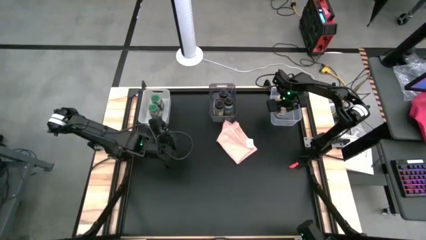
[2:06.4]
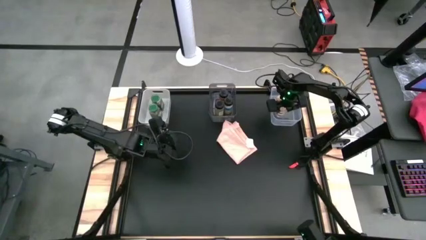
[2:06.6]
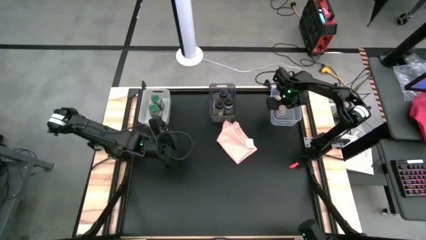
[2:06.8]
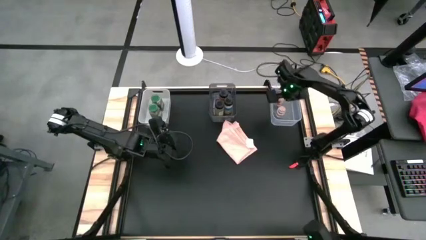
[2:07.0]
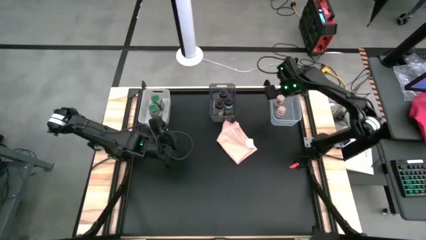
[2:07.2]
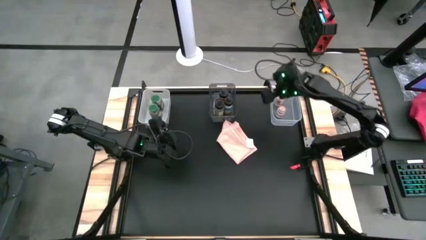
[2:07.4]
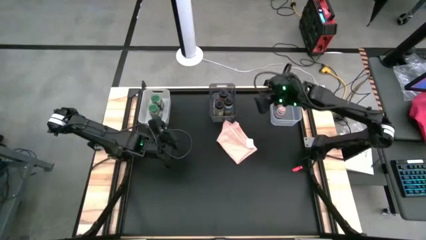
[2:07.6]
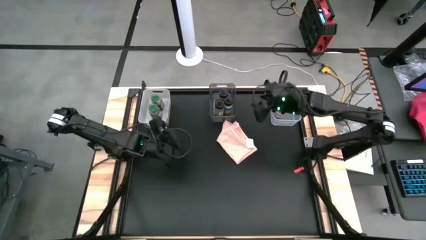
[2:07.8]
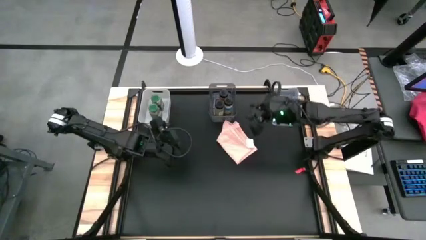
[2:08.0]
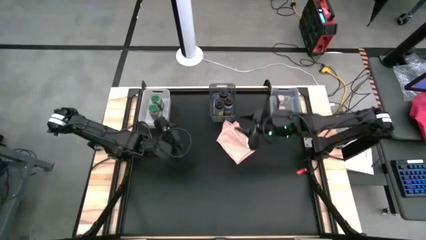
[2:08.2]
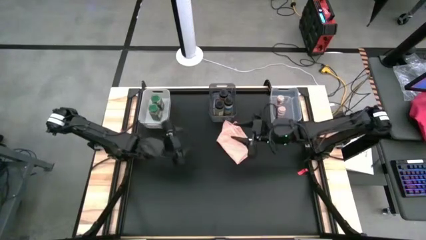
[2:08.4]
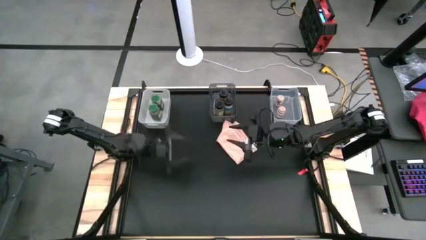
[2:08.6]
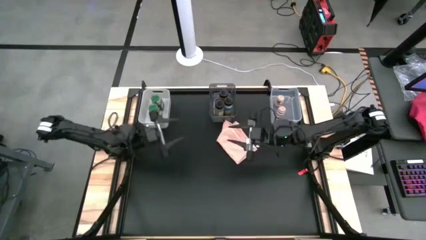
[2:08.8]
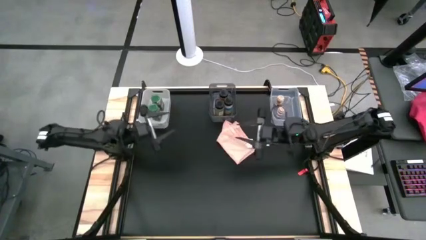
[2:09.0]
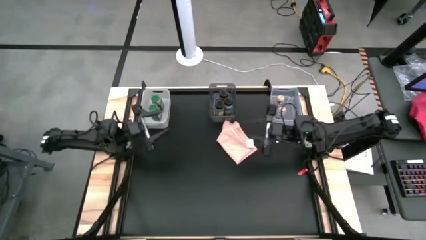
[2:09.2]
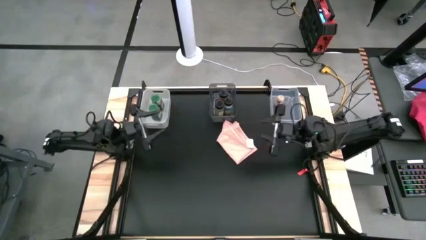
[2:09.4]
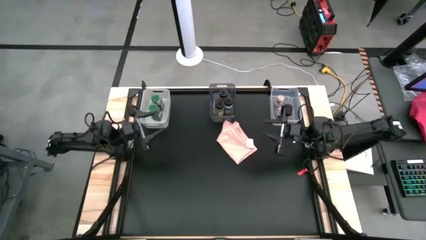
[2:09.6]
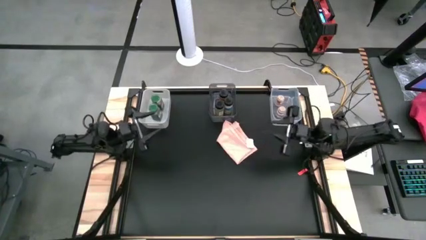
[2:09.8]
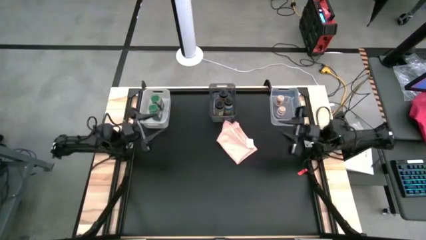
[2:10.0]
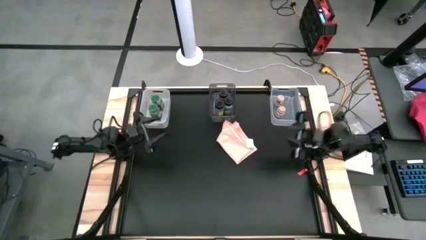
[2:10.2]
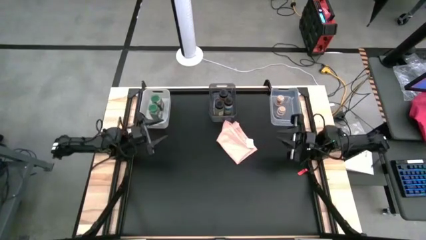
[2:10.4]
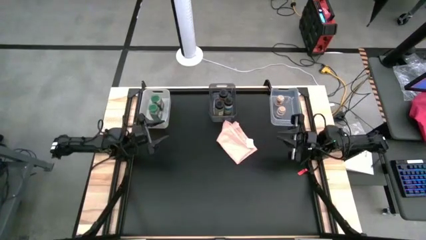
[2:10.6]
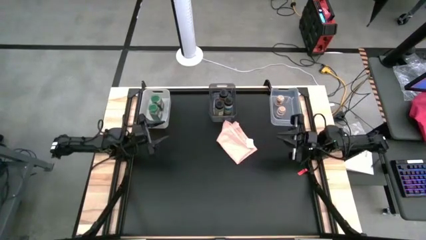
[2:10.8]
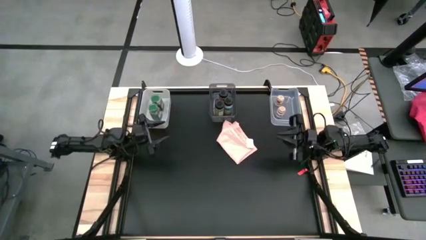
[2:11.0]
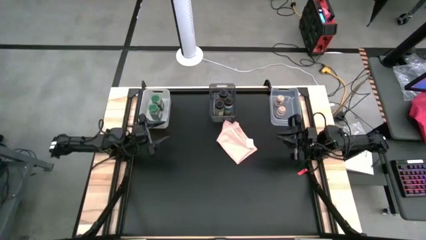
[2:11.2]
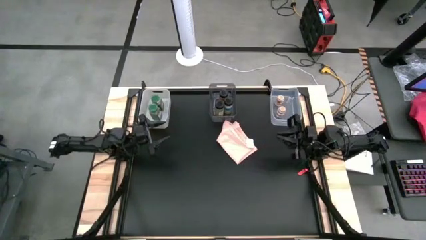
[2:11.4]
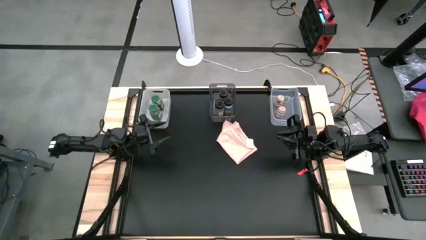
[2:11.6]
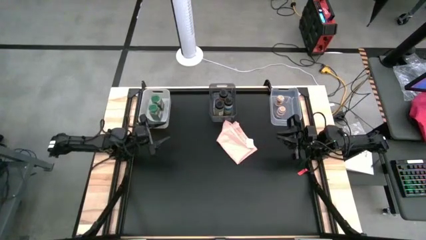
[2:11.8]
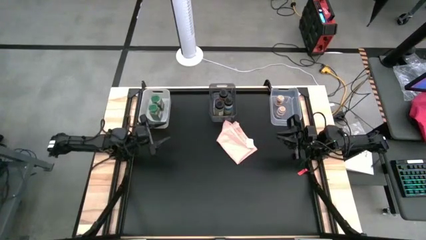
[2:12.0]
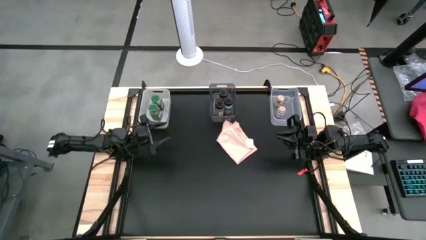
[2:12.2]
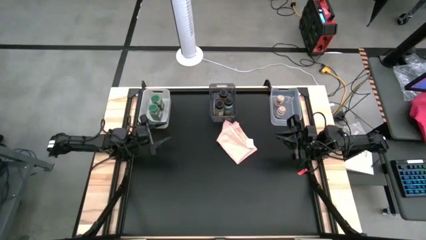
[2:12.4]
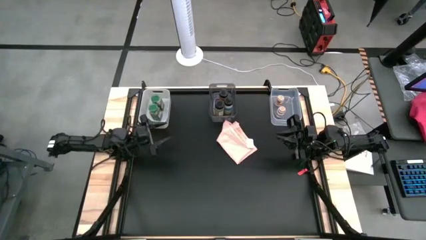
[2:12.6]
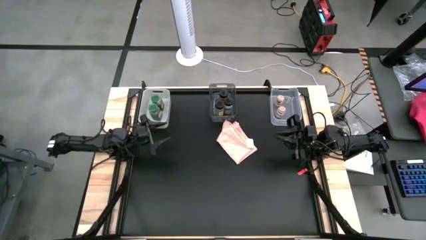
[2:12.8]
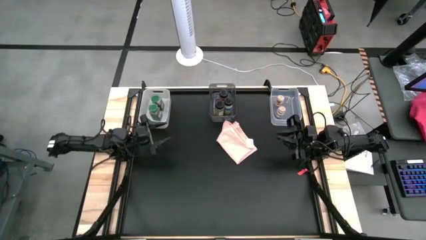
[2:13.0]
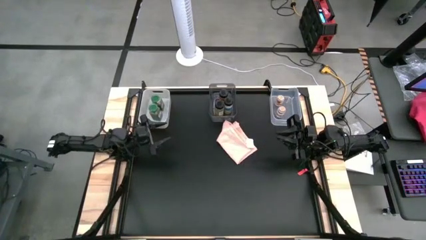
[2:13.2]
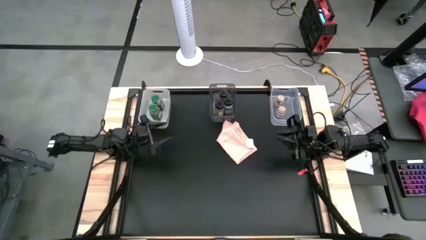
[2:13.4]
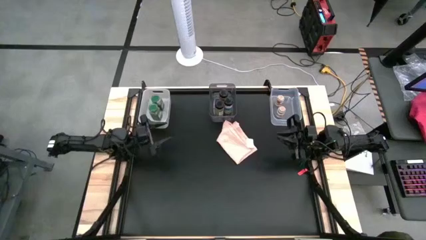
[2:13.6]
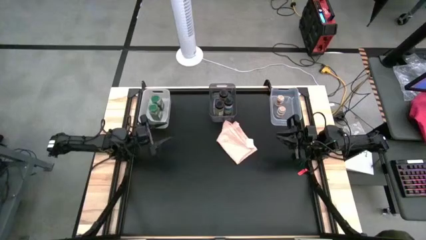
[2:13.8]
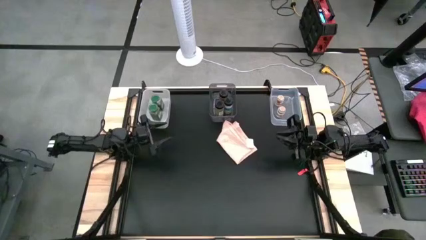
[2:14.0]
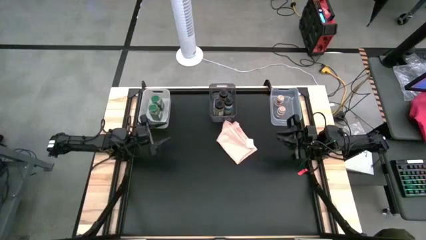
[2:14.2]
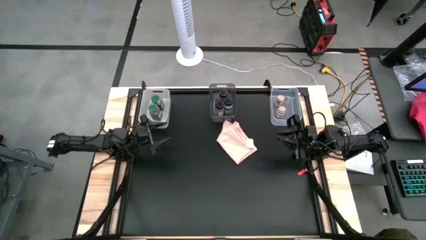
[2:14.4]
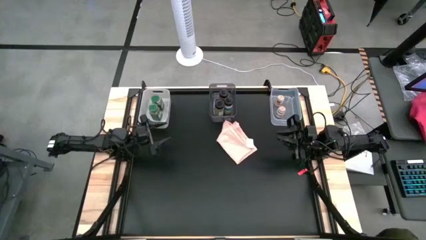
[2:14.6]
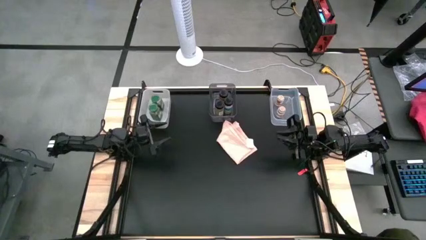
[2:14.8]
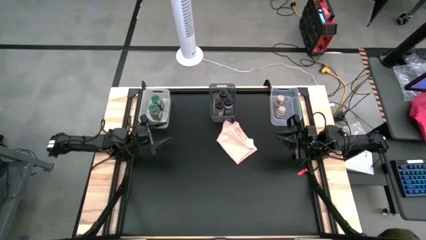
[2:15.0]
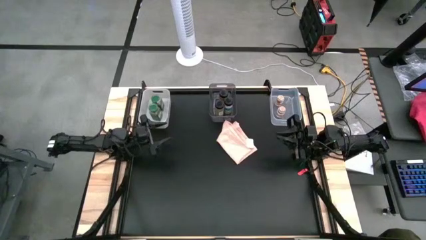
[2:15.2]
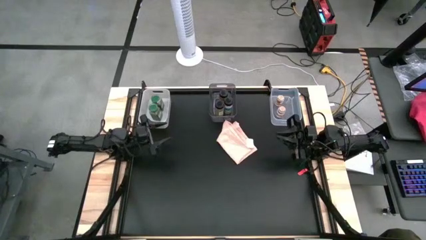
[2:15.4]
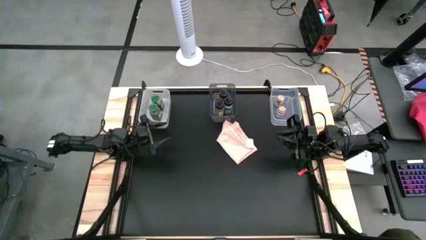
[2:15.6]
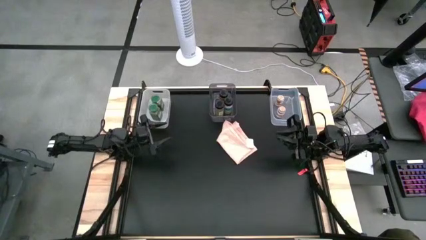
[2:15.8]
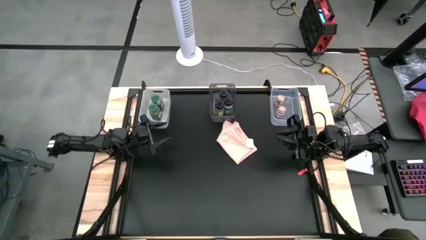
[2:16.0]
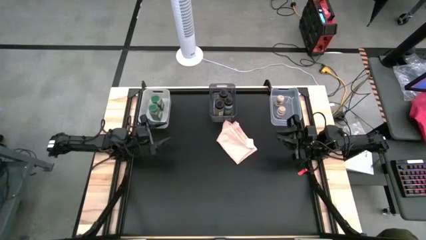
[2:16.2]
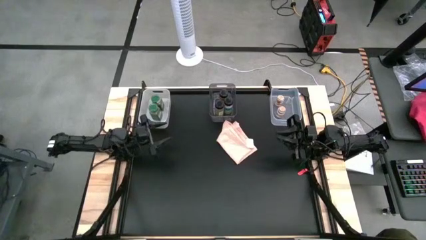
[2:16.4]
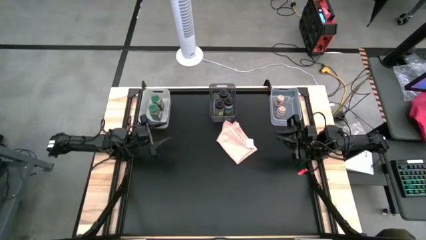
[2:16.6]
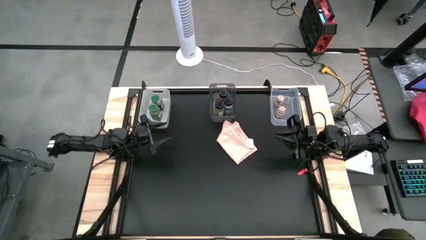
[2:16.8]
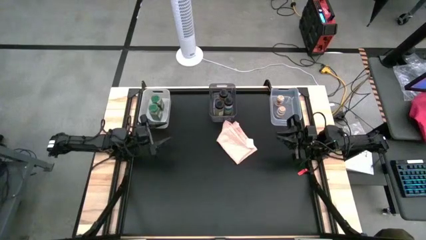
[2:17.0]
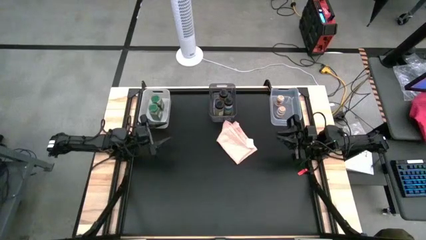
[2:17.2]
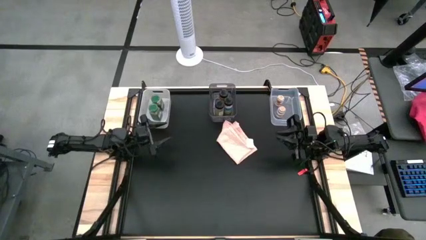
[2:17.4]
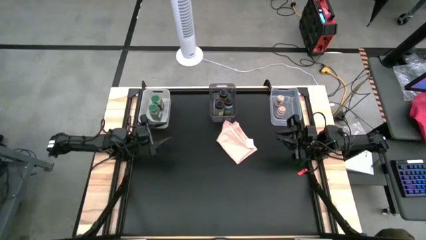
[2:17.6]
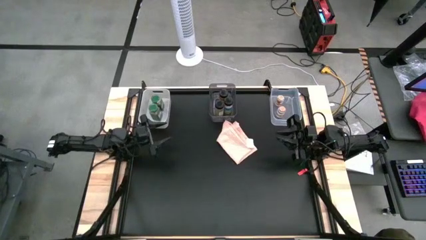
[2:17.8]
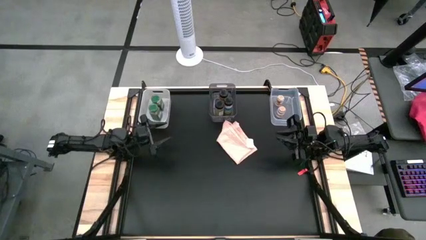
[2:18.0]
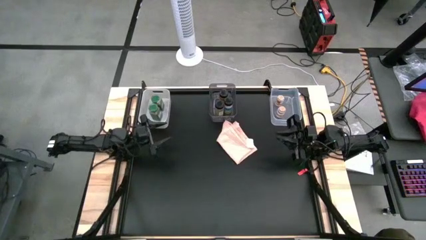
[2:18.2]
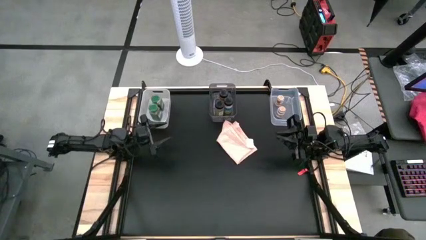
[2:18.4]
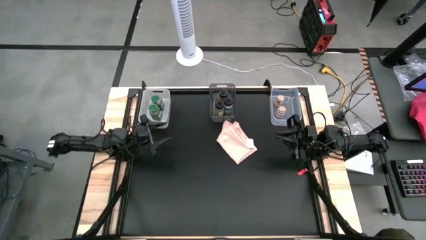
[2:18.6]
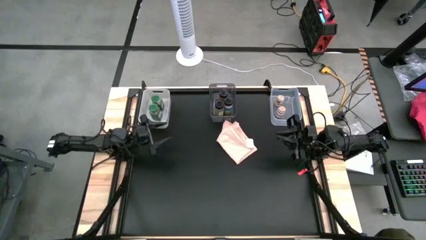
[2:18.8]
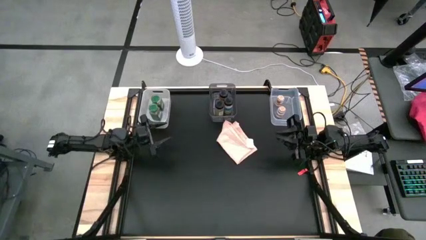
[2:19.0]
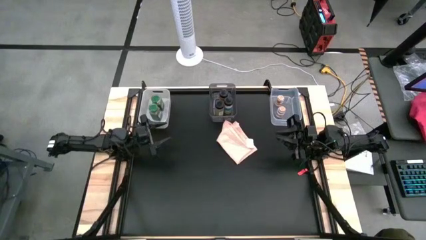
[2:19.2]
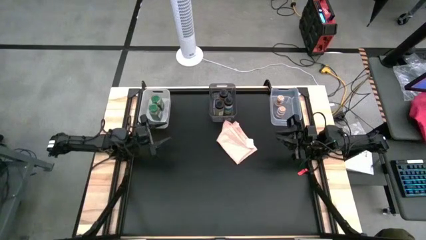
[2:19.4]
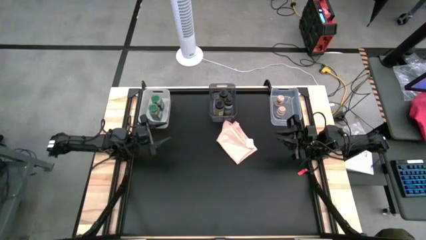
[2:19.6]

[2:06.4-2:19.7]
Task: Sort spices by type
Return to Home Position
